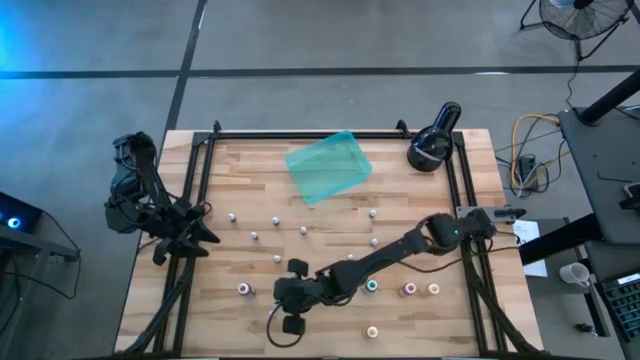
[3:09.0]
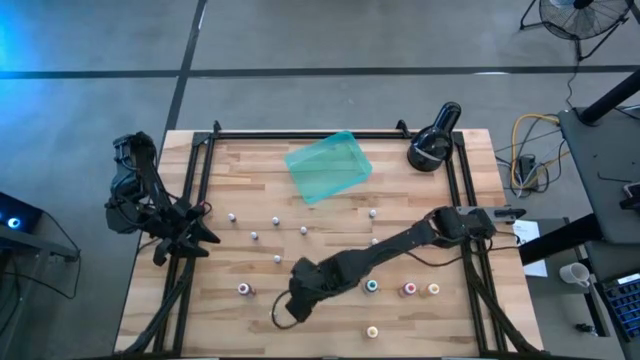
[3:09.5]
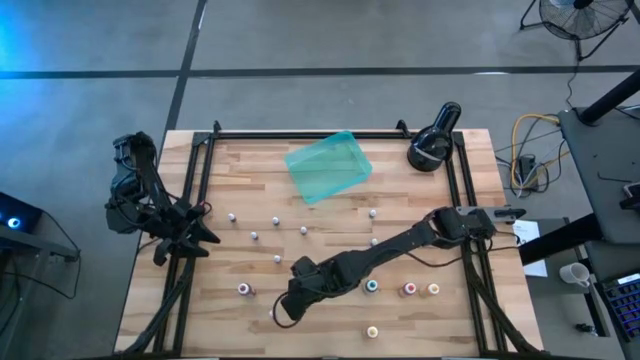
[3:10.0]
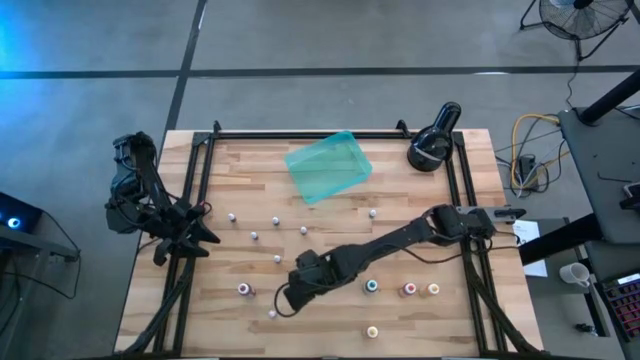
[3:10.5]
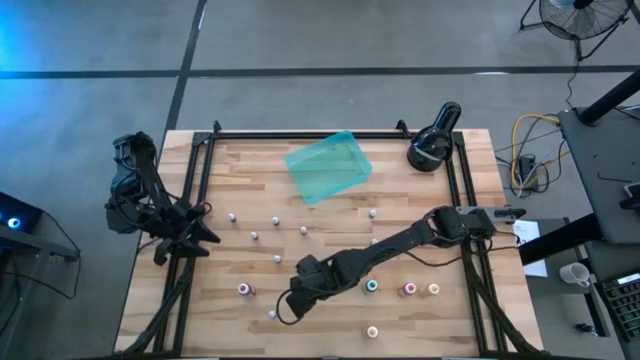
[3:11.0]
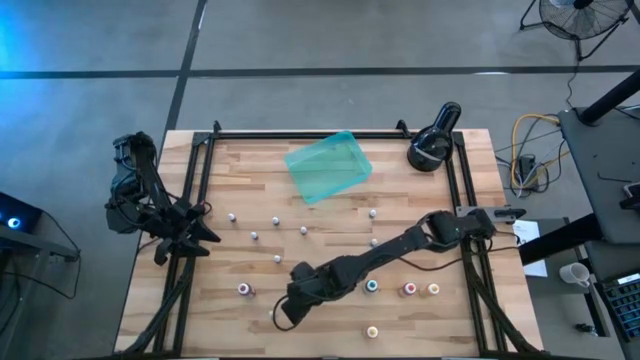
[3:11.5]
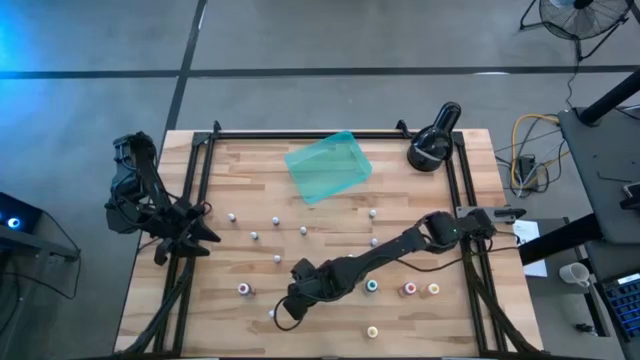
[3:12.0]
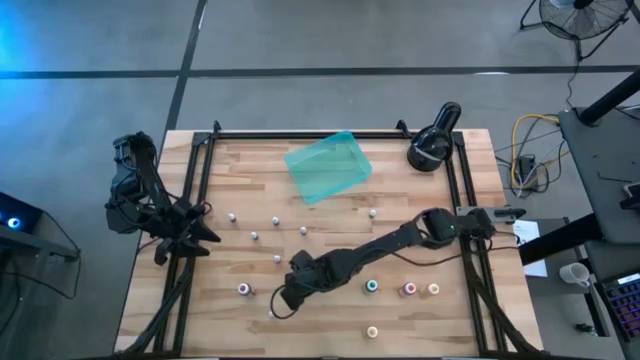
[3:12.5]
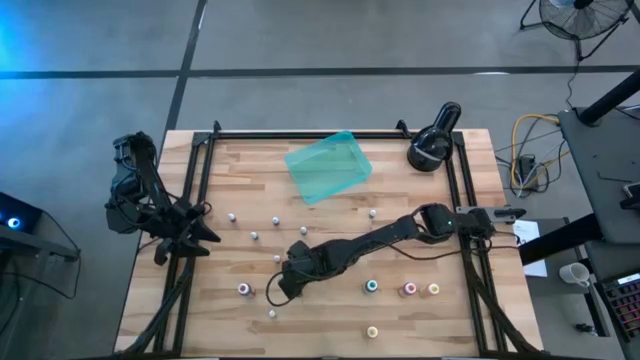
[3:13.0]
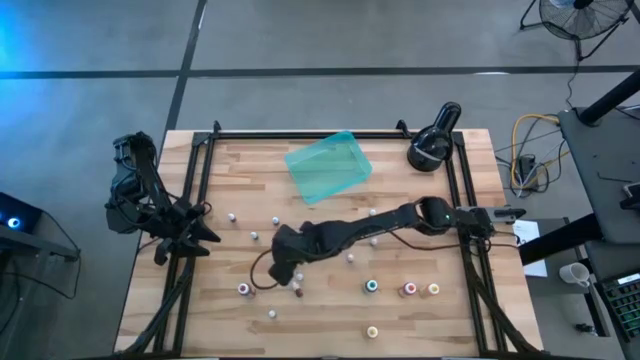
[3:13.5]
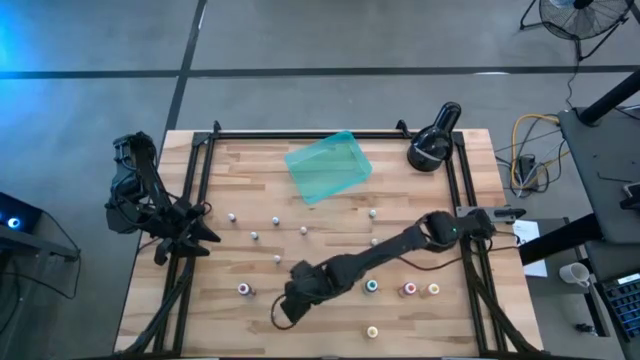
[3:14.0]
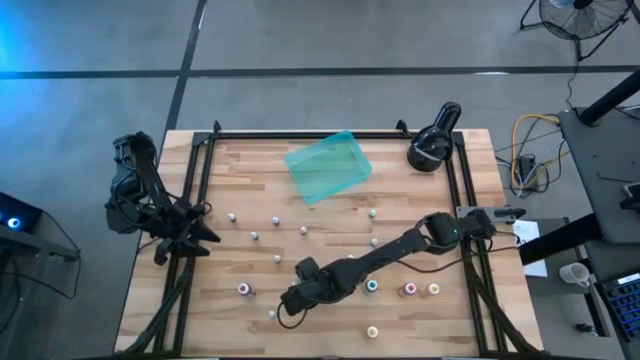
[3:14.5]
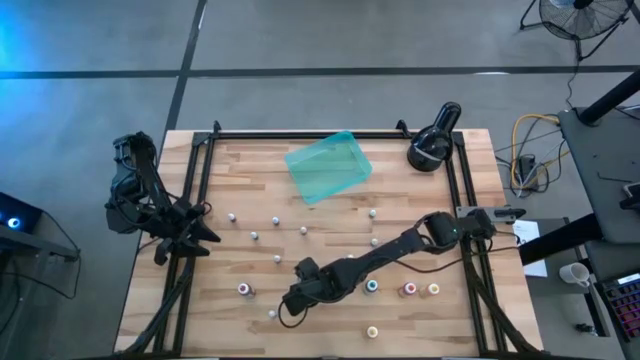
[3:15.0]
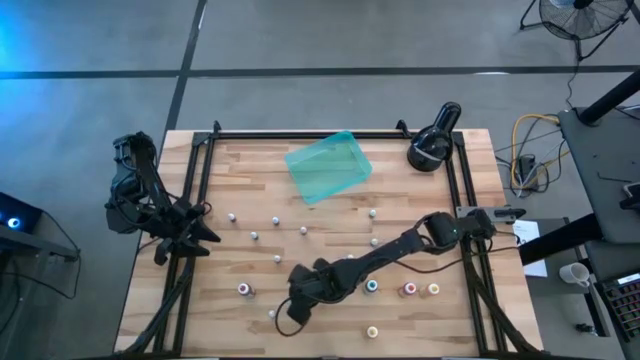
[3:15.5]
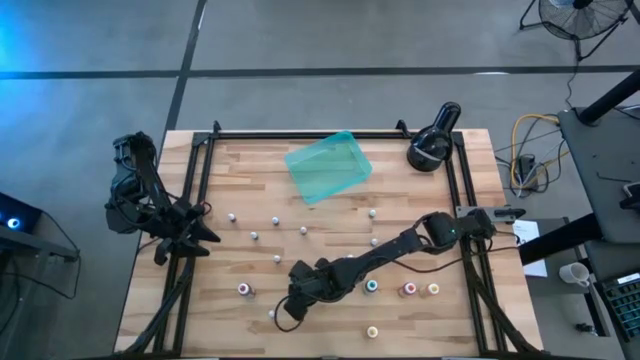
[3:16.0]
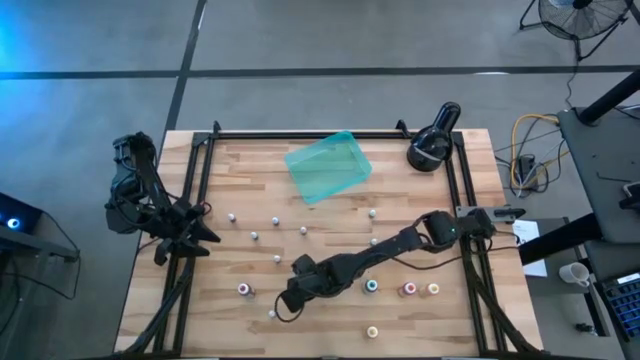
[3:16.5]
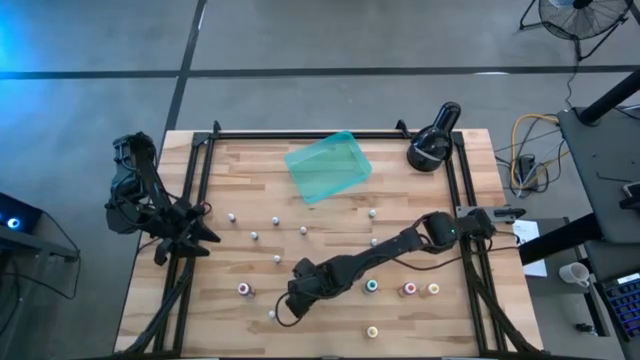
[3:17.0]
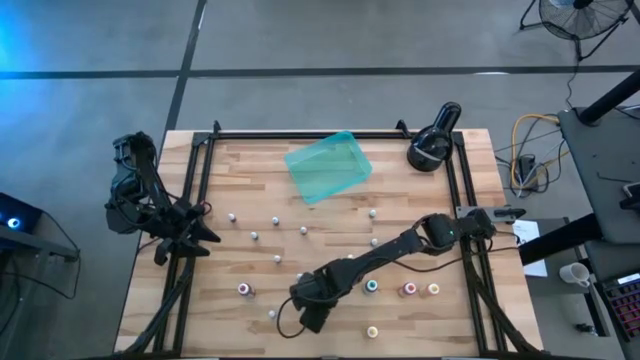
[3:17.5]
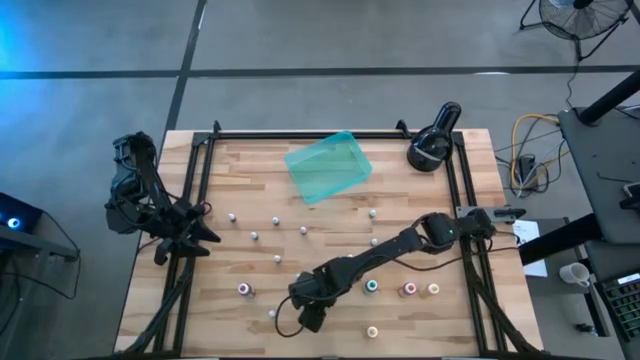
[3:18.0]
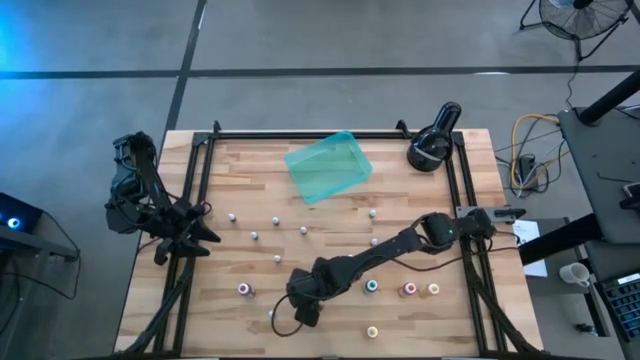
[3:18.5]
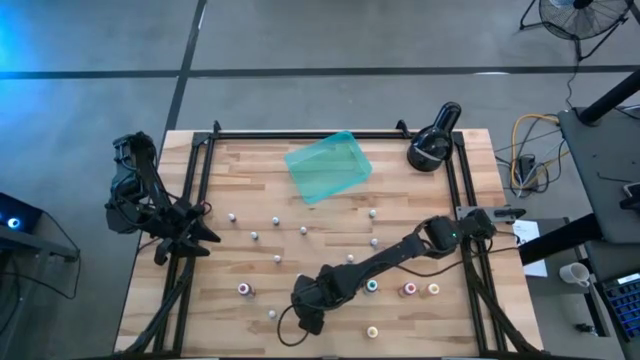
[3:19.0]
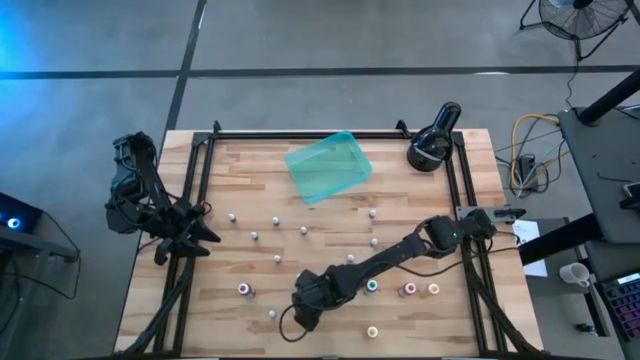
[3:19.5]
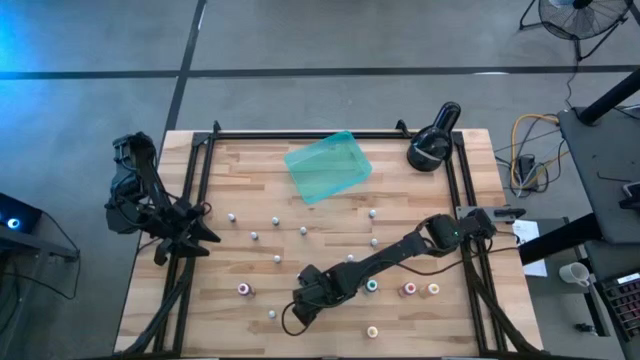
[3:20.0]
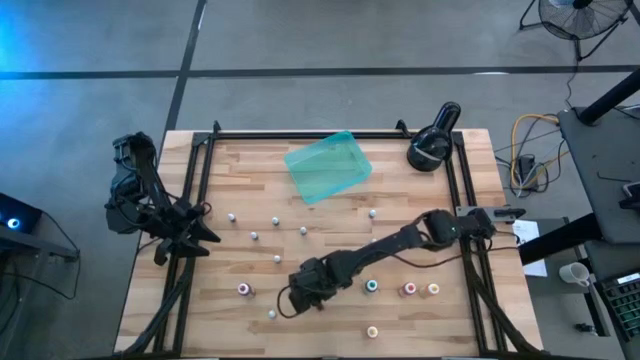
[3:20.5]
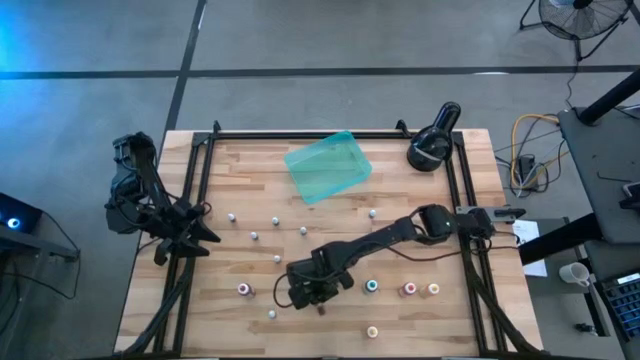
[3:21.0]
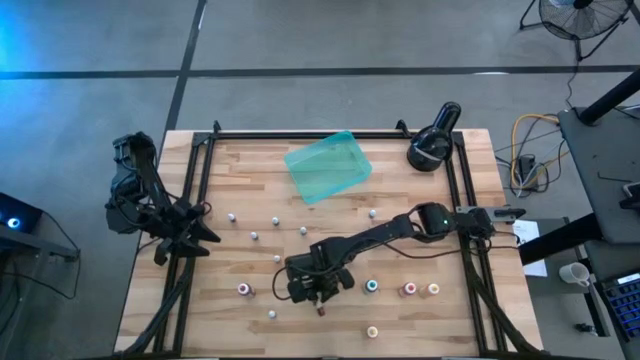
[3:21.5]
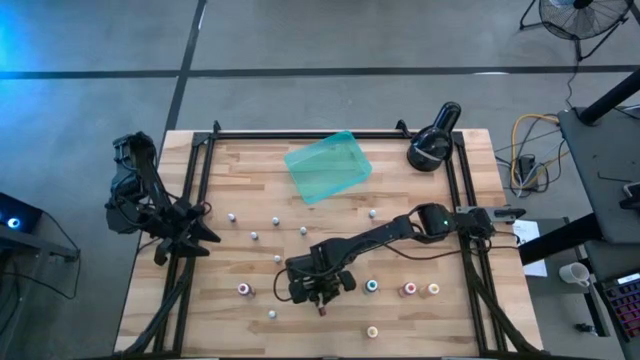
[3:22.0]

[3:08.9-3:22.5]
Task: Pick & Place food coloring
Adjust the black small food coloring bottle

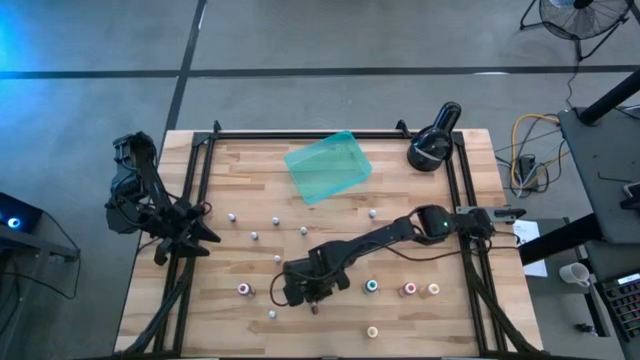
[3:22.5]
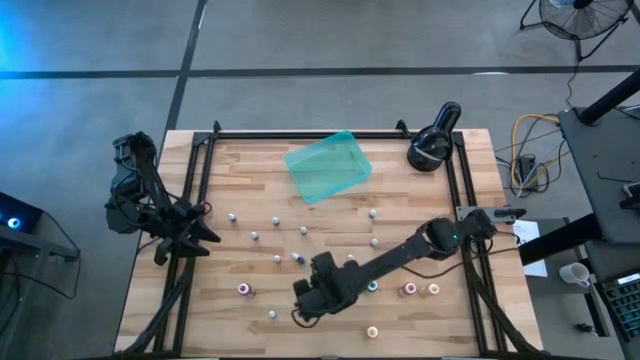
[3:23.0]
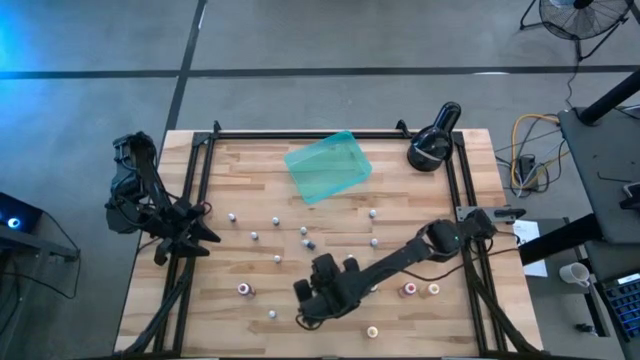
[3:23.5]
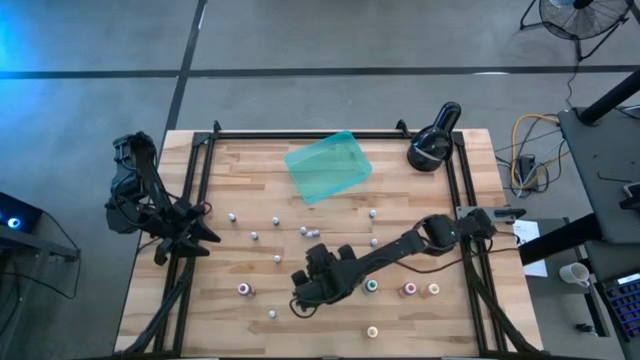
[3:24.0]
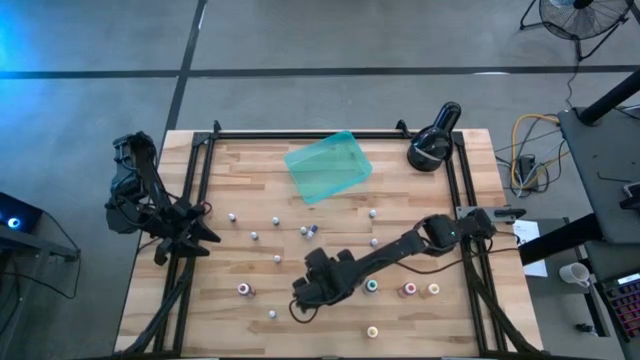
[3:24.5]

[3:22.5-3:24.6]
Adjust the red small food coloring bottle

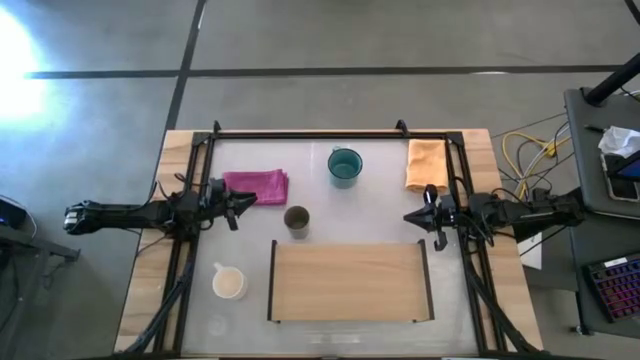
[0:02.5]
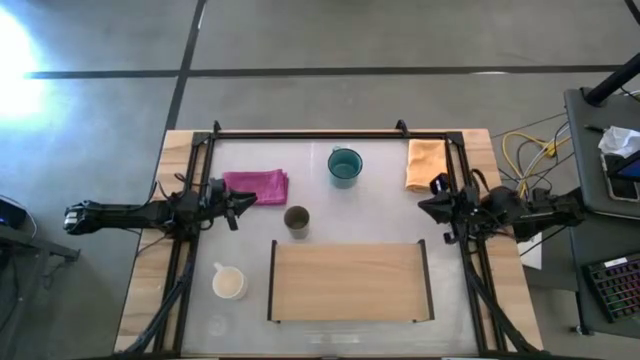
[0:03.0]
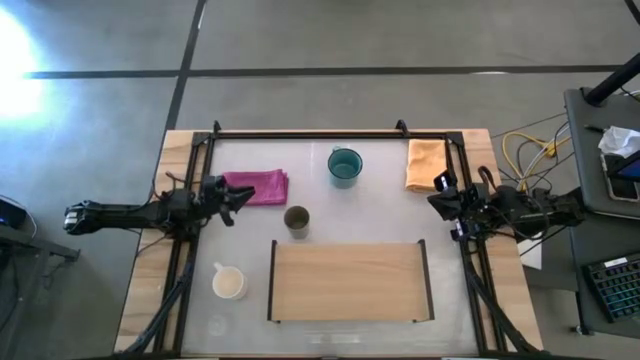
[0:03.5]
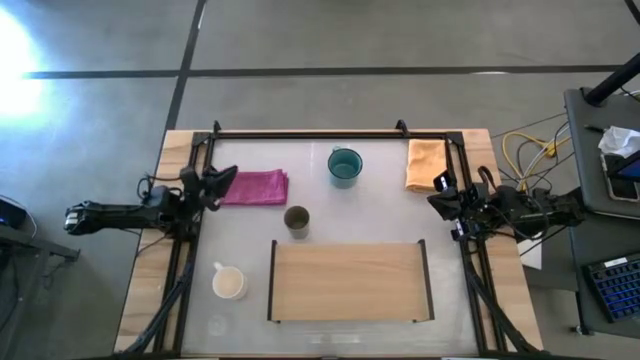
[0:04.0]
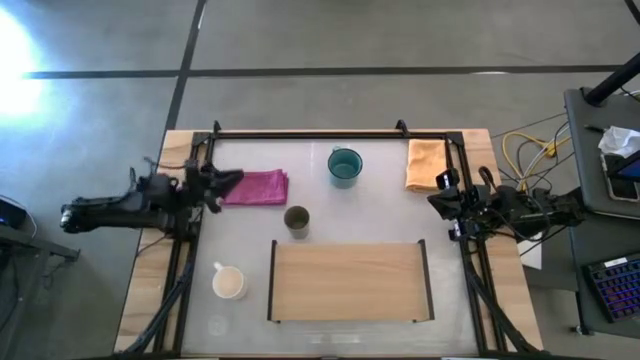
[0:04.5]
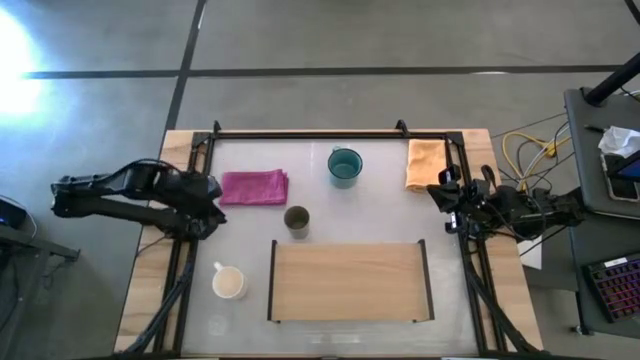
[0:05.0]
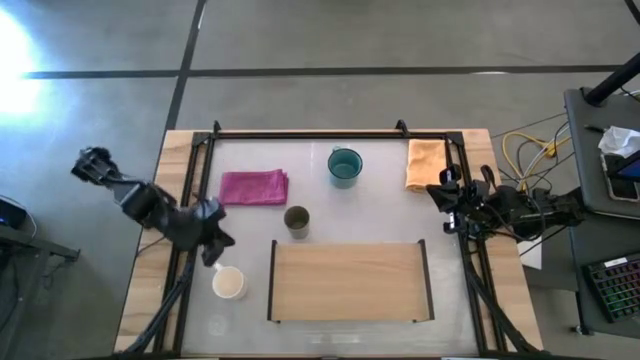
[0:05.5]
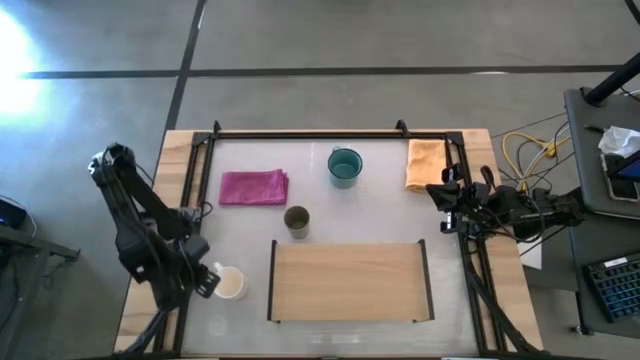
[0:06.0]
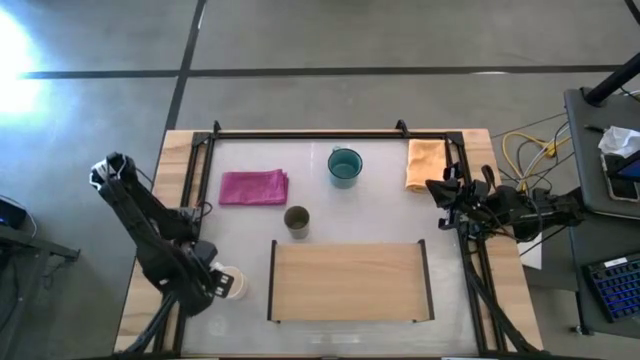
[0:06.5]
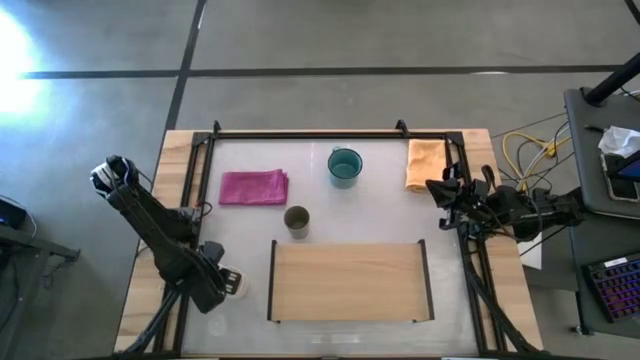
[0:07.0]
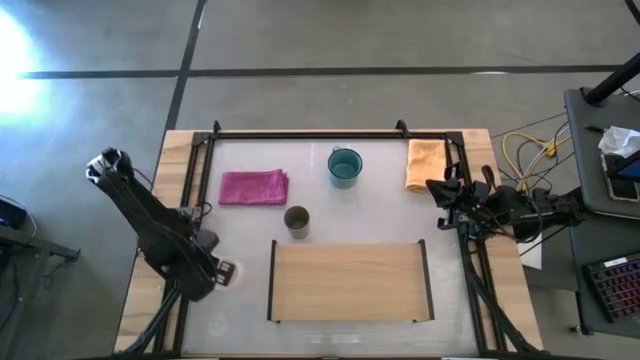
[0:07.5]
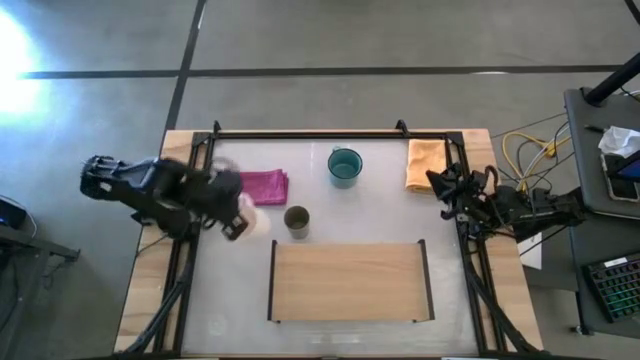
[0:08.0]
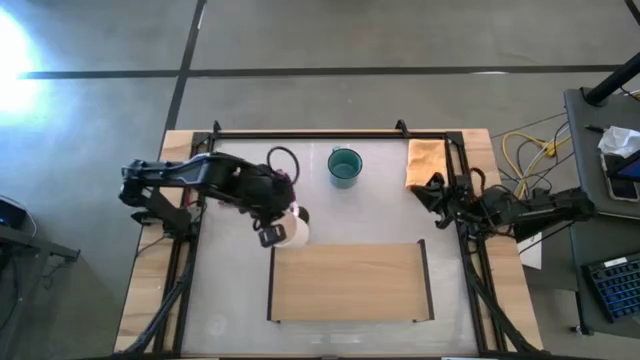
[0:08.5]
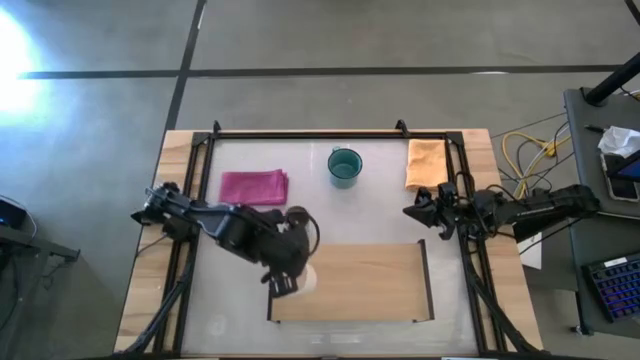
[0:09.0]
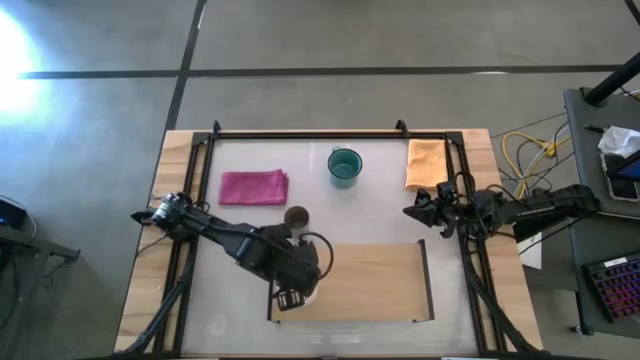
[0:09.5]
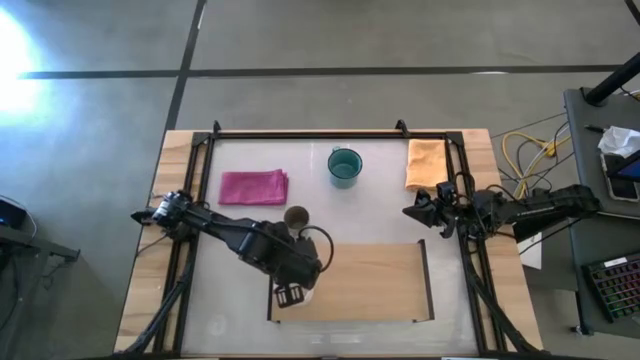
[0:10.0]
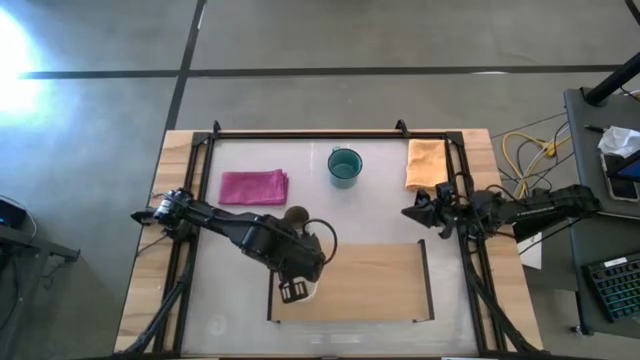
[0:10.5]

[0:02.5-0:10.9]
Task: Stack small to large cups/mugs on shelf
Put the white mug on the shelf
